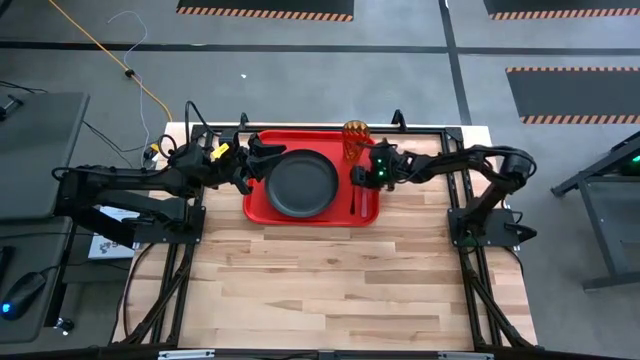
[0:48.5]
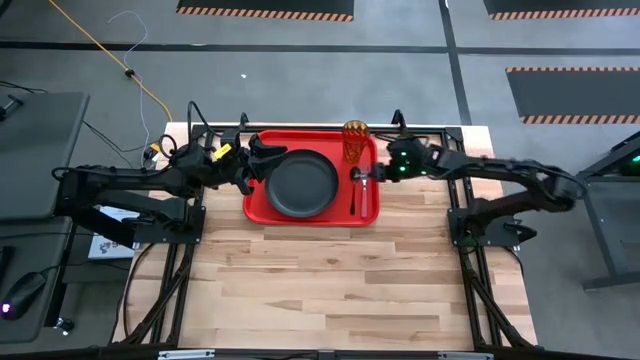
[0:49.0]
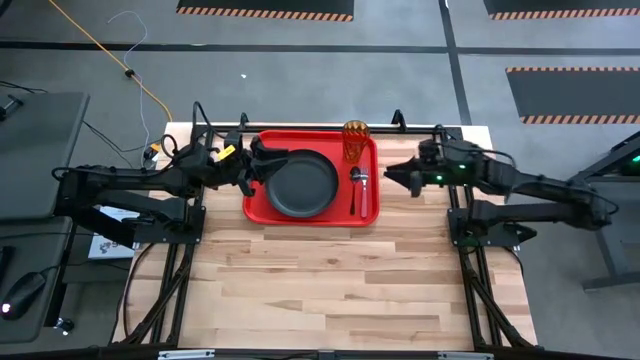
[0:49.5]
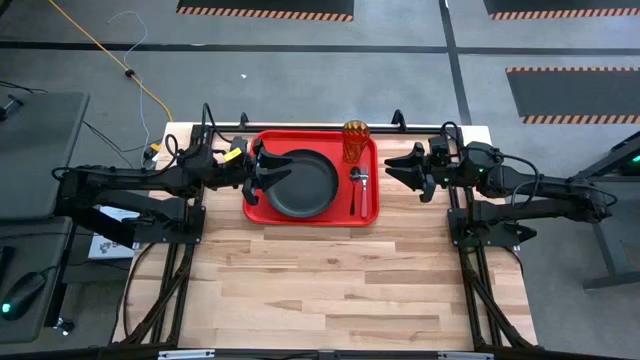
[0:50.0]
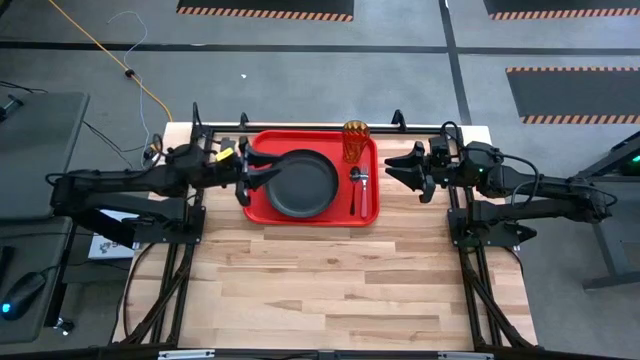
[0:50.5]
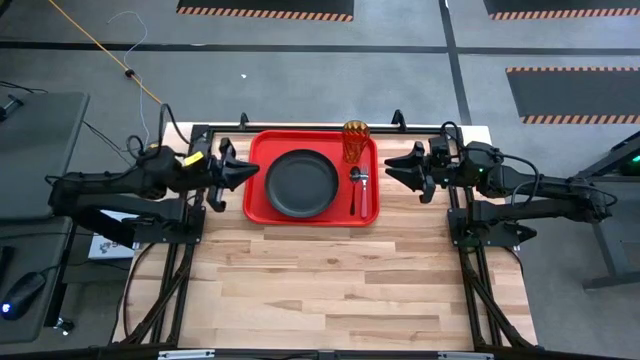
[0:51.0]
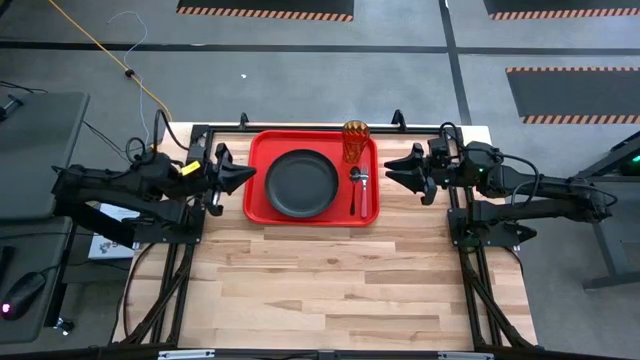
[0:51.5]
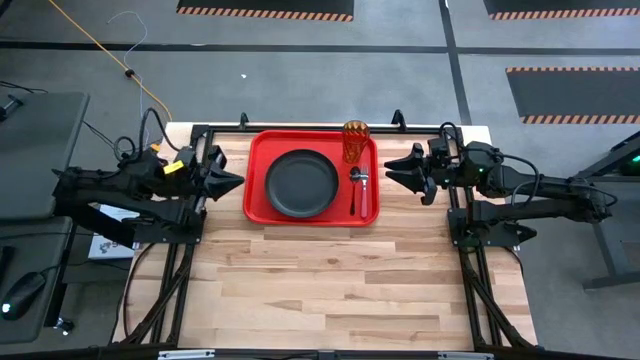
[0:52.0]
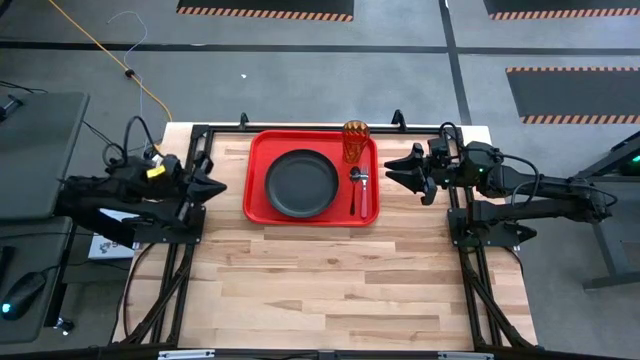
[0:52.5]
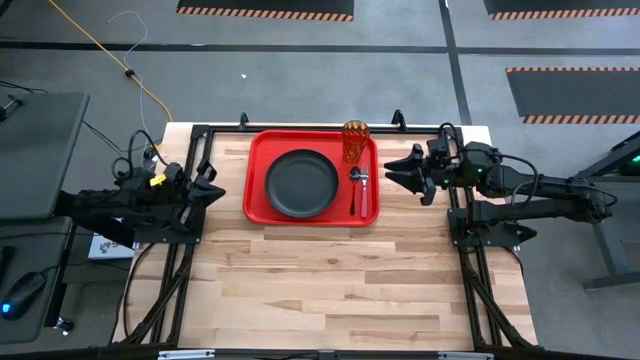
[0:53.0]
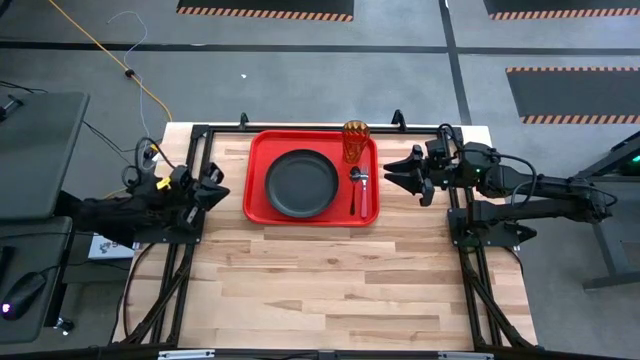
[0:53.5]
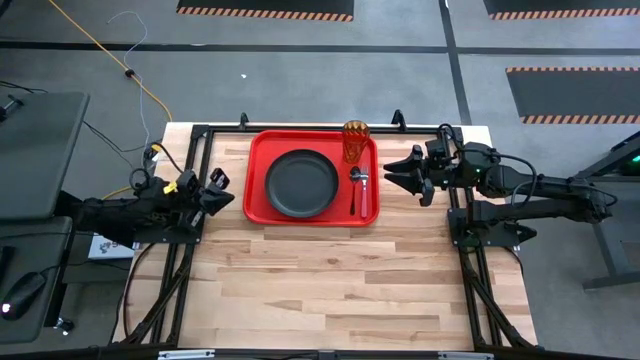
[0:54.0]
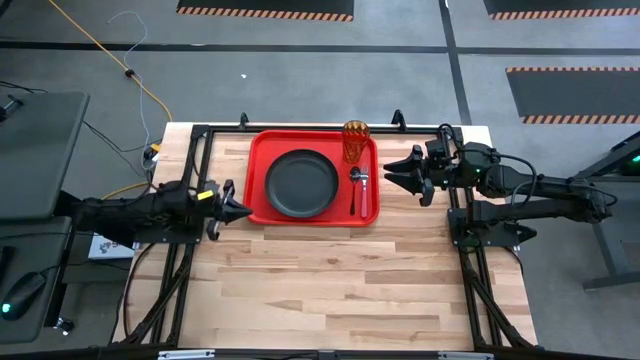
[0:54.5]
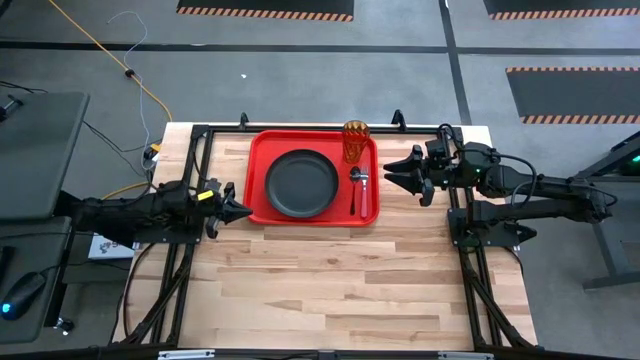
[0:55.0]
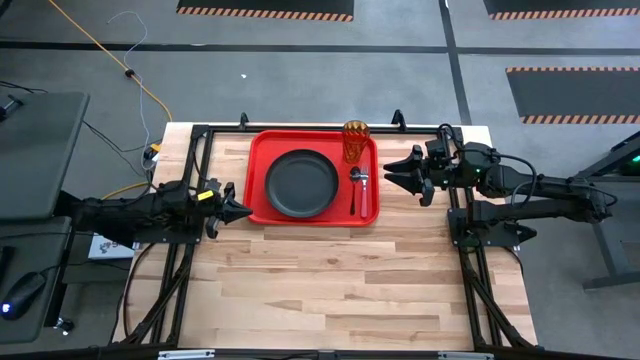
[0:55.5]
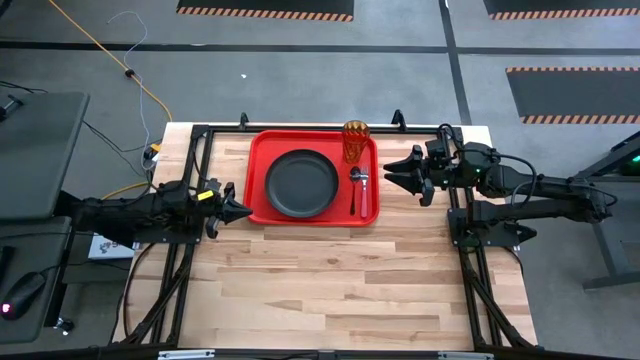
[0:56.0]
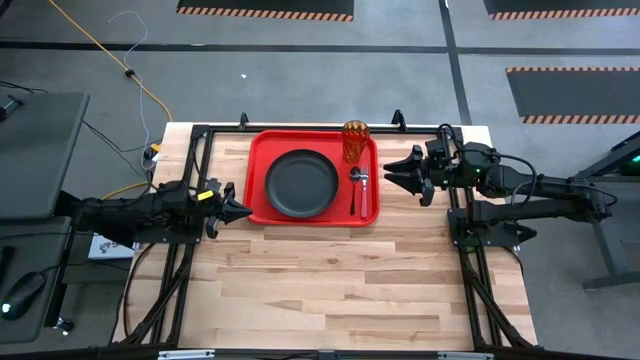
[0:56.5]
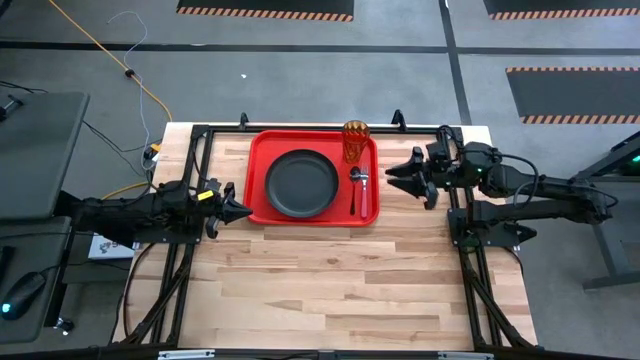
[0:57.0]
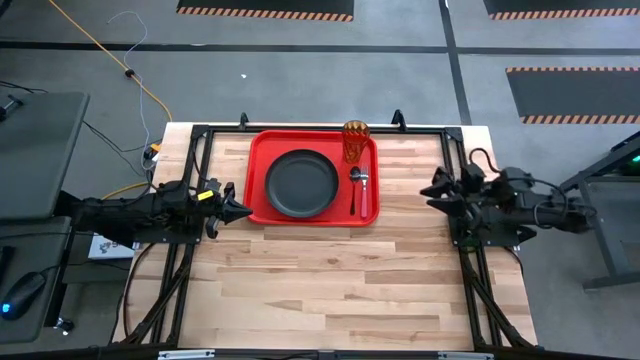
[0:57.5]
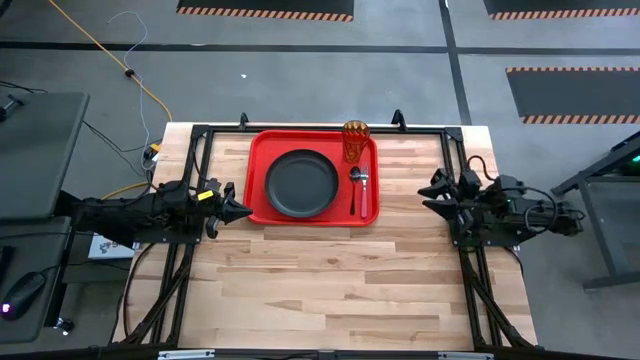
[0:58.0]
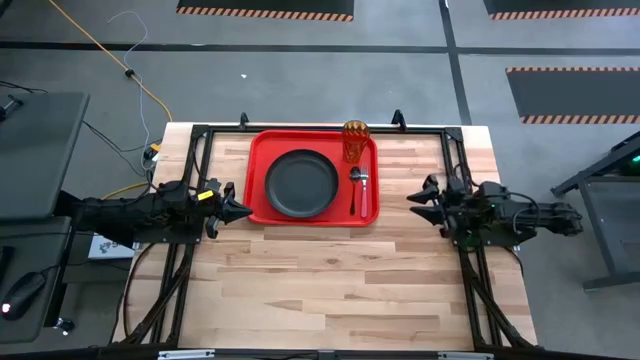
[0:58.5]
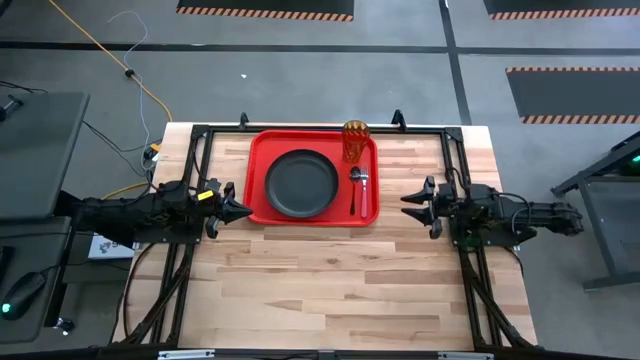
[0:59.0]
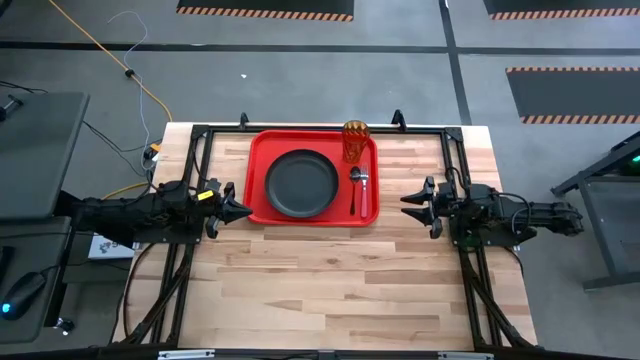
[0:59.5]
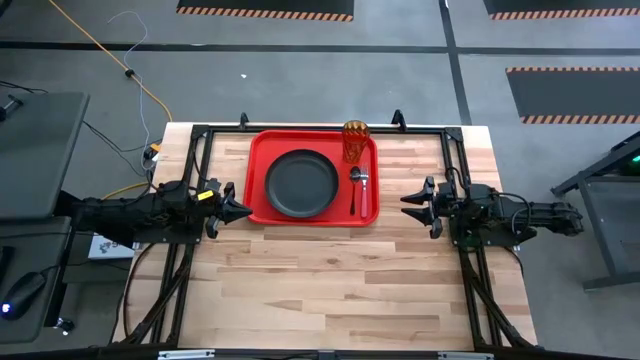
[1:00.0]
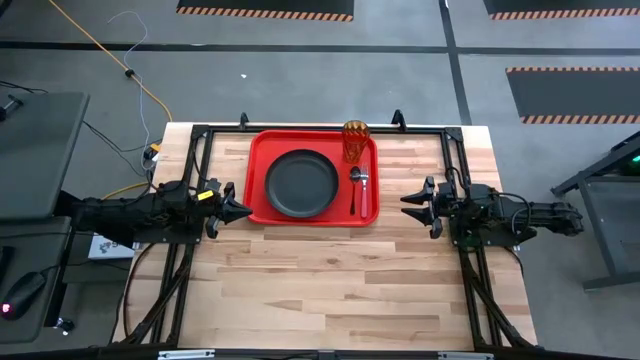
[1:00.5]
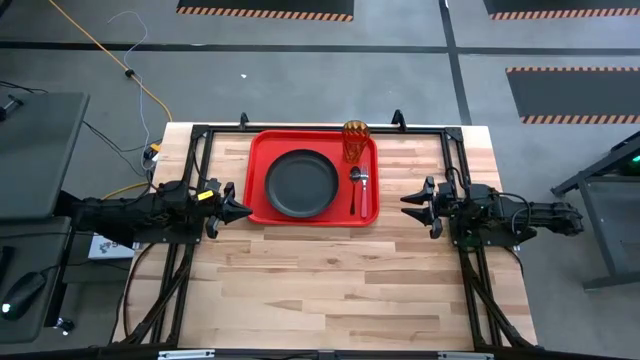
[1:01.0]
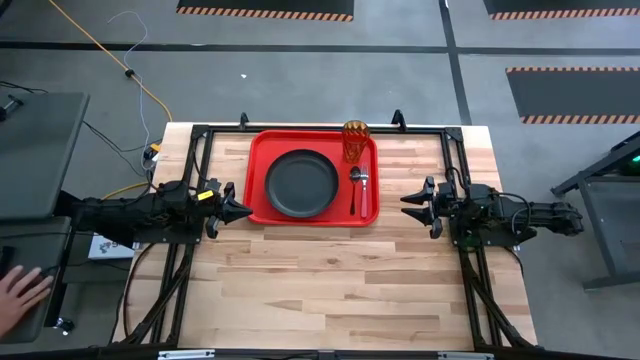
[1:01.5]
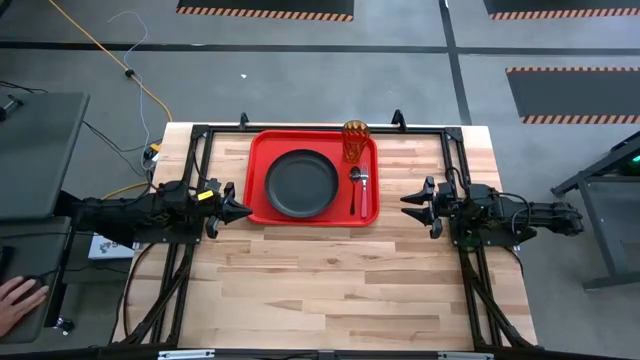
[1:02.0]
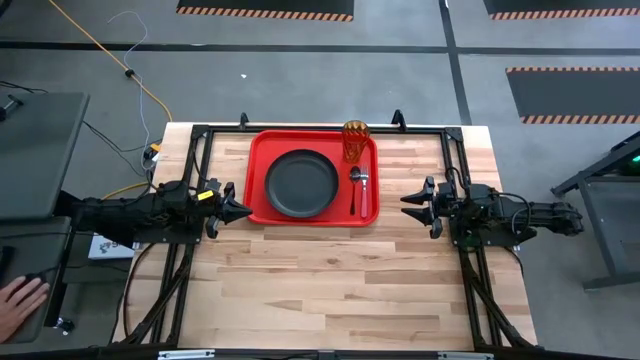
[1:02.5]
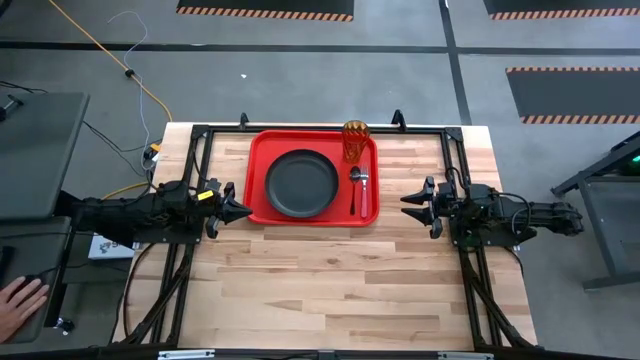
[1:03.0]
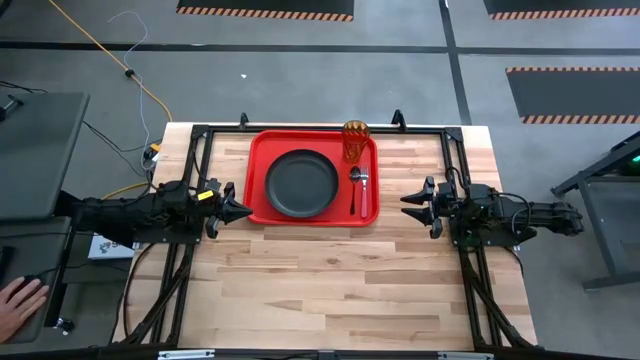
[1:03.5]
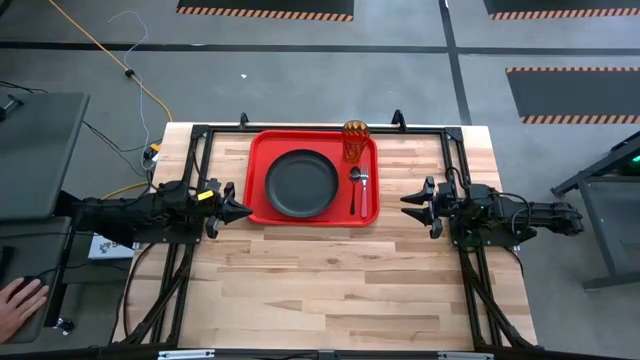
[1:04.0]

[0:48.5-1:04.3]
Task: Pick and place plate/cup/fork/spoon on tray
Return to Home Position

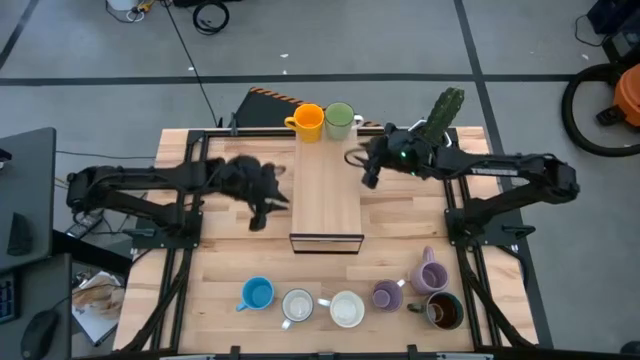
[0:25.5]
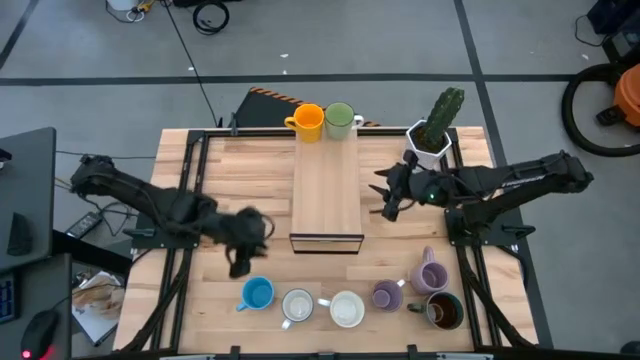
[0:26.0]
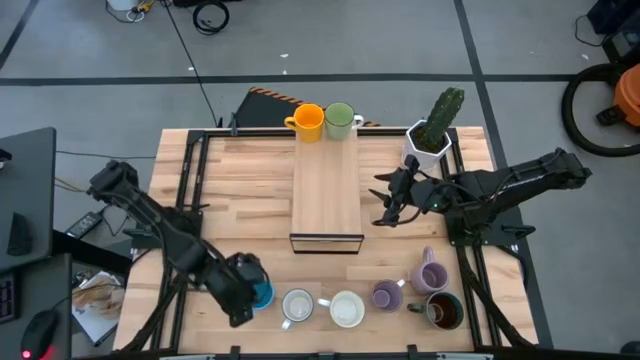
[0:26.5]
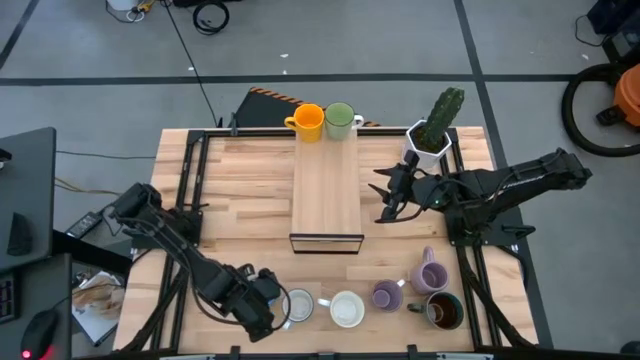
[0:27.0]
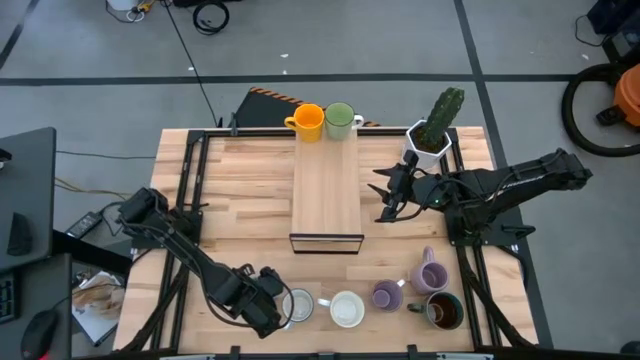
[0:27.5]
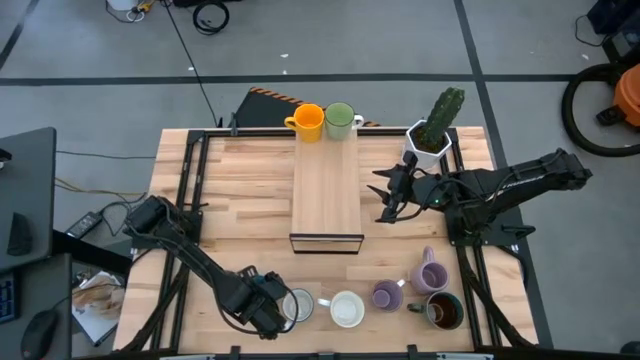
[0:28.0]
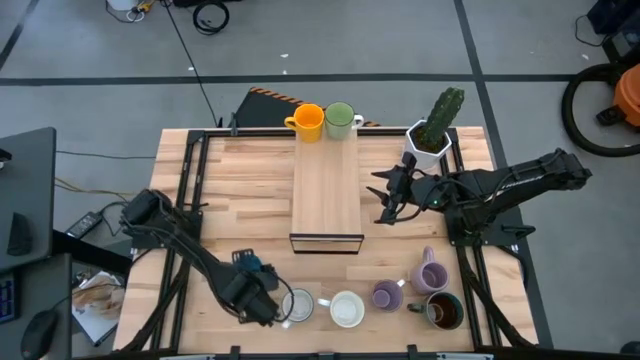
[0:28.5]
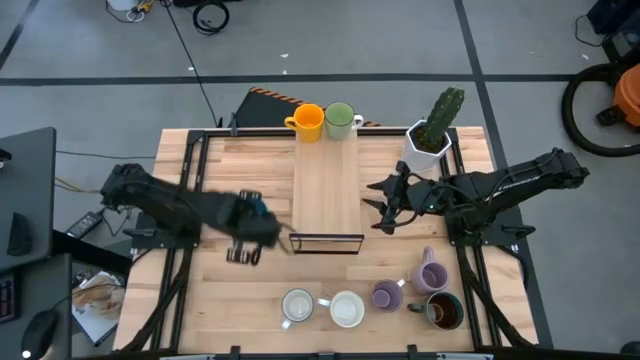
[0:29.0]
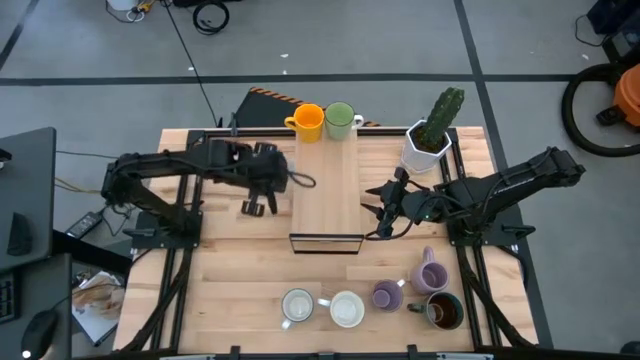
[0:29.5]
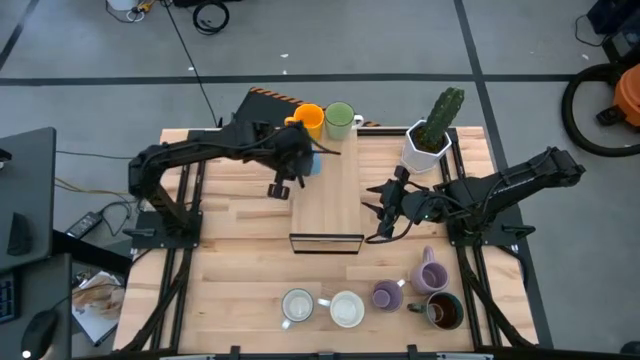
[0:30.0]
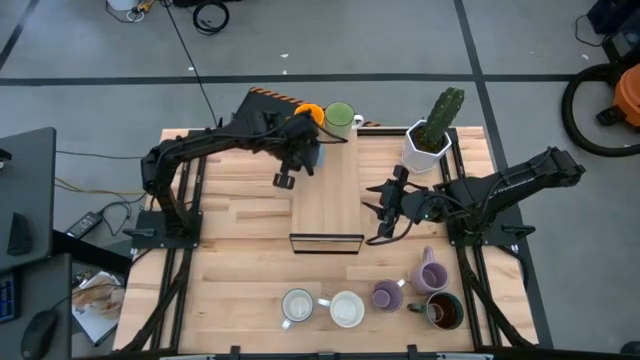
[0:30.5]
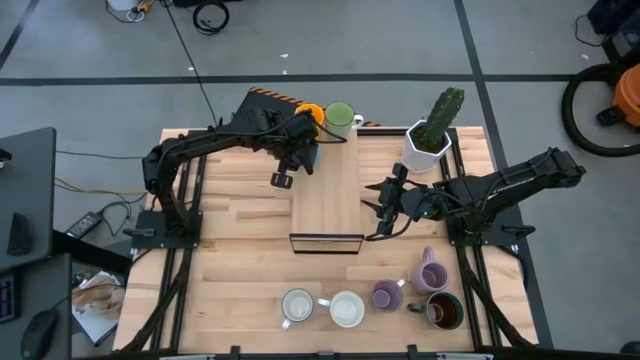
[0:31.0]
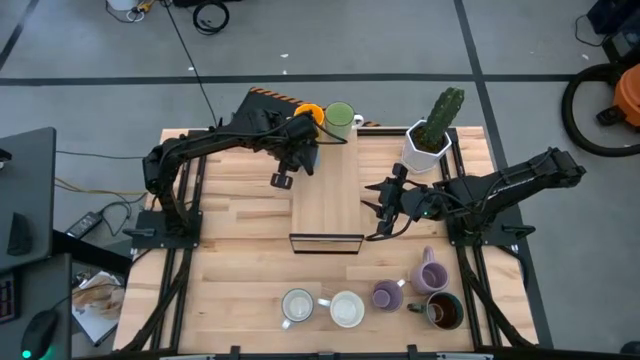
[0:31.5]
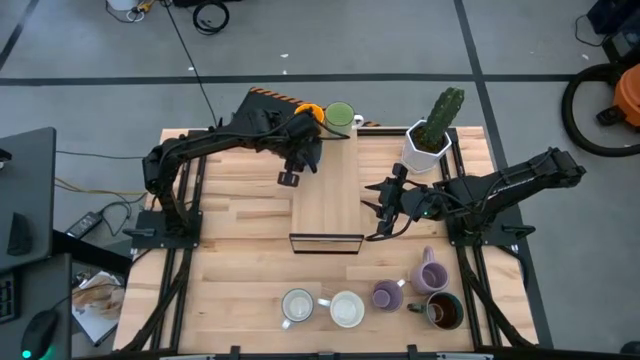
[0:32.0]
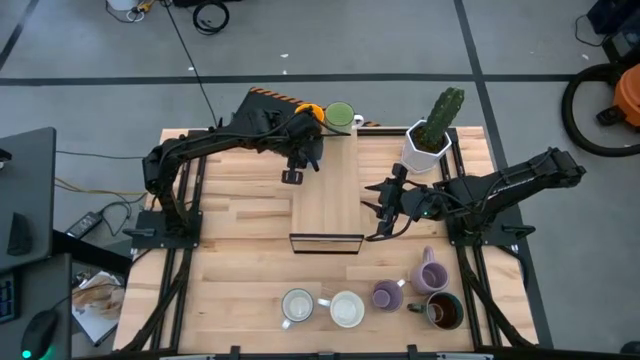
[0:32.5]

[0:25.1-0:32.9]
Task: Place coffee mugs
Put the blue mug on the shelf
